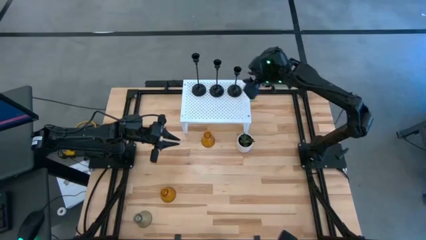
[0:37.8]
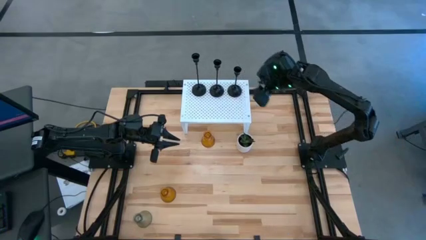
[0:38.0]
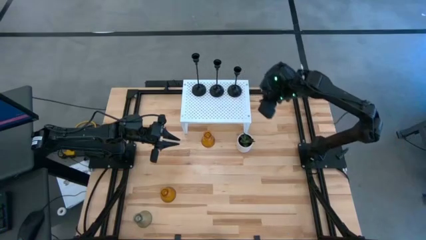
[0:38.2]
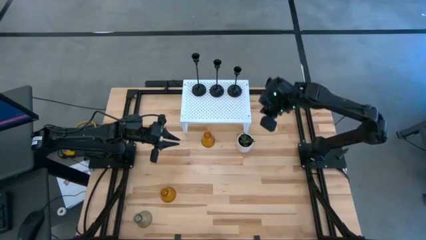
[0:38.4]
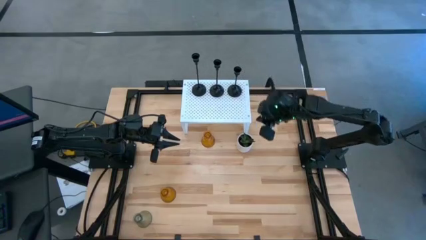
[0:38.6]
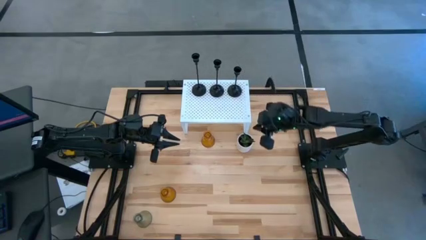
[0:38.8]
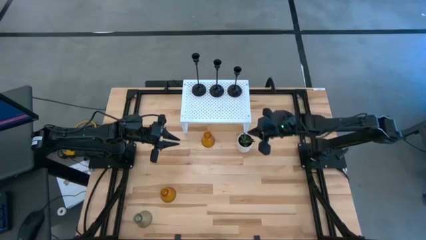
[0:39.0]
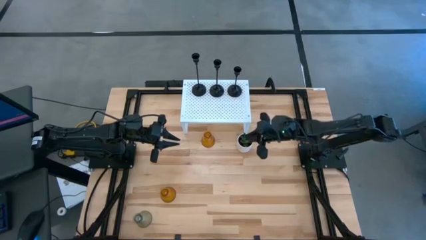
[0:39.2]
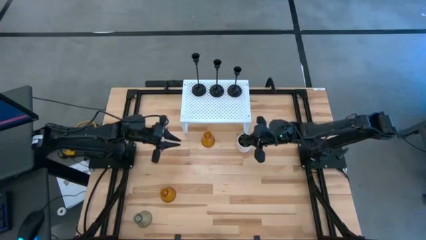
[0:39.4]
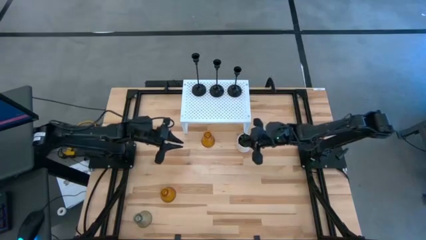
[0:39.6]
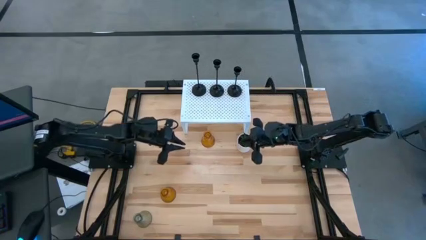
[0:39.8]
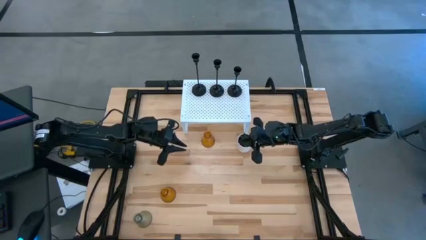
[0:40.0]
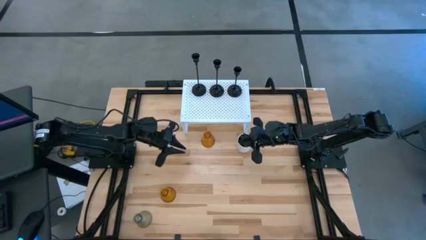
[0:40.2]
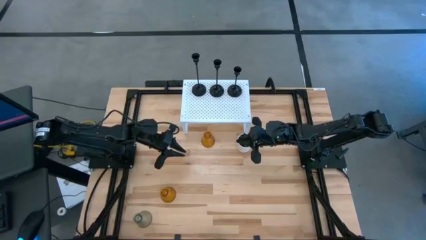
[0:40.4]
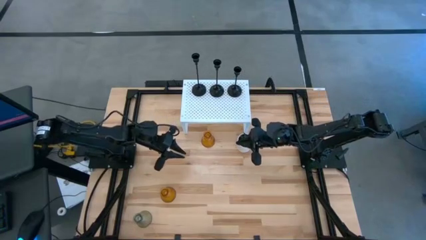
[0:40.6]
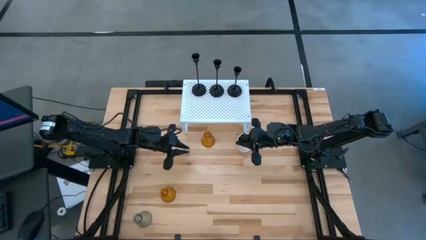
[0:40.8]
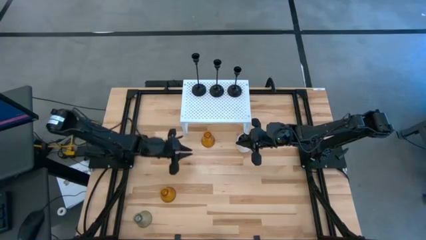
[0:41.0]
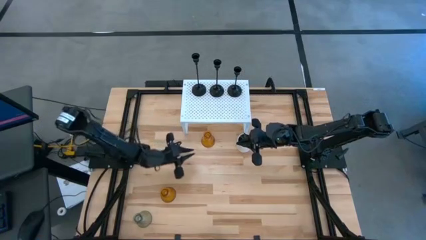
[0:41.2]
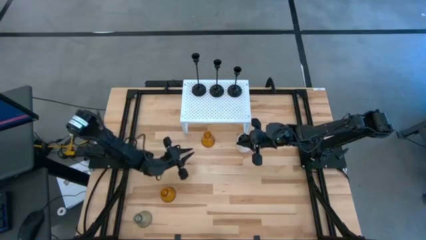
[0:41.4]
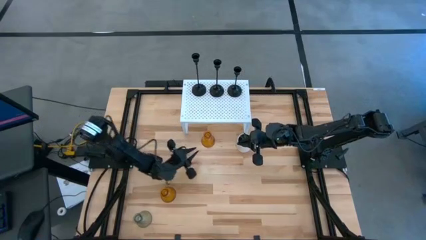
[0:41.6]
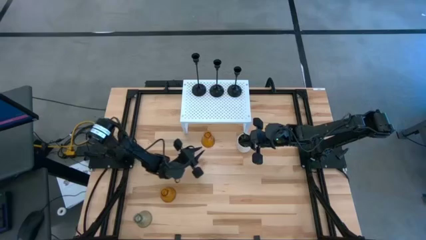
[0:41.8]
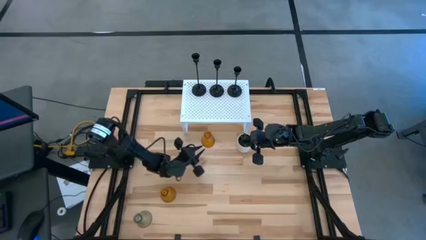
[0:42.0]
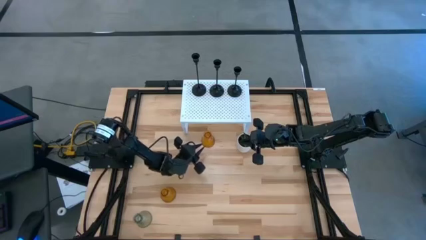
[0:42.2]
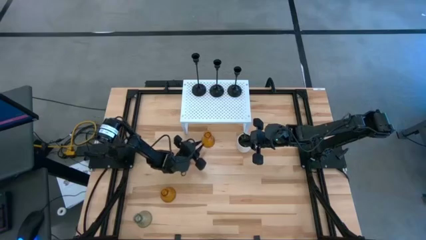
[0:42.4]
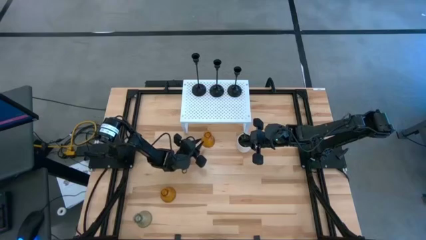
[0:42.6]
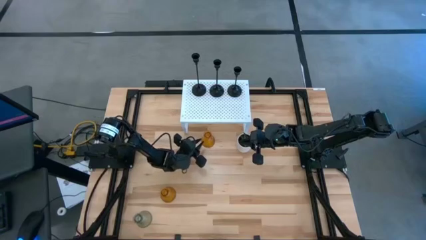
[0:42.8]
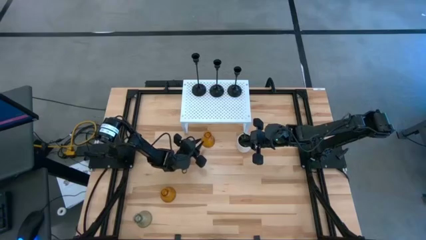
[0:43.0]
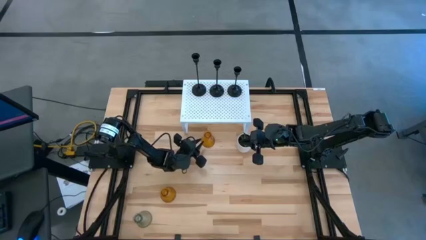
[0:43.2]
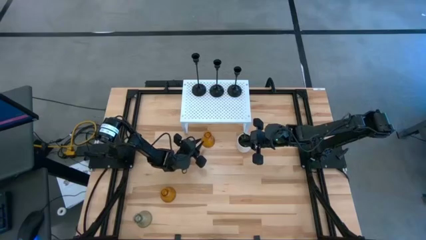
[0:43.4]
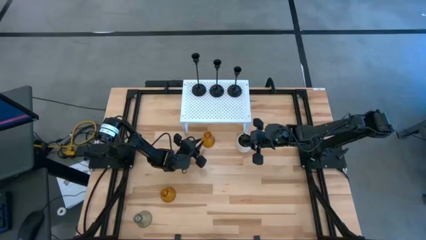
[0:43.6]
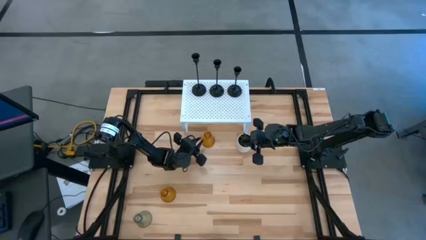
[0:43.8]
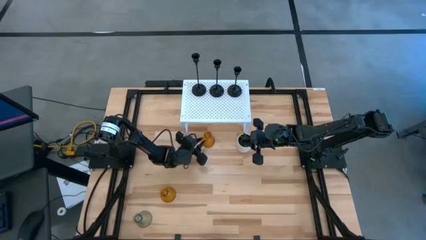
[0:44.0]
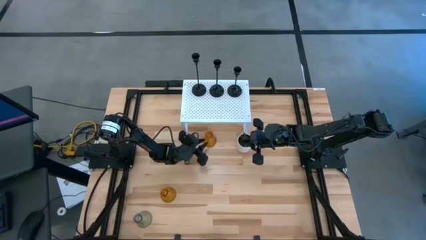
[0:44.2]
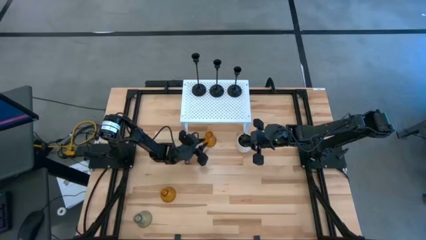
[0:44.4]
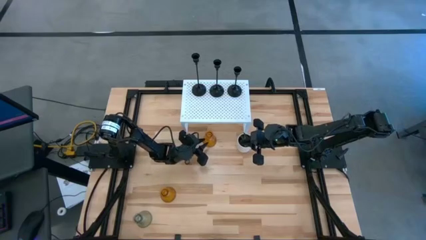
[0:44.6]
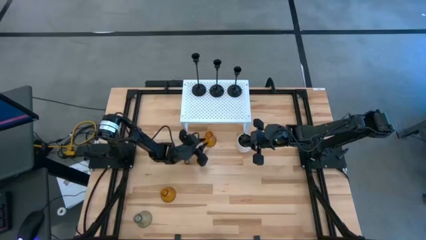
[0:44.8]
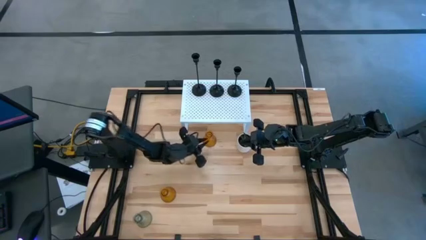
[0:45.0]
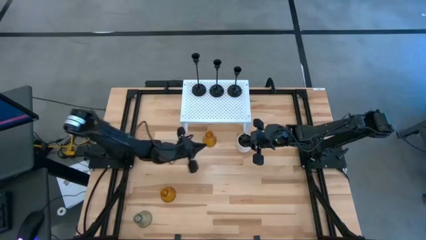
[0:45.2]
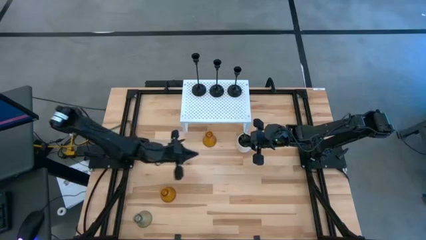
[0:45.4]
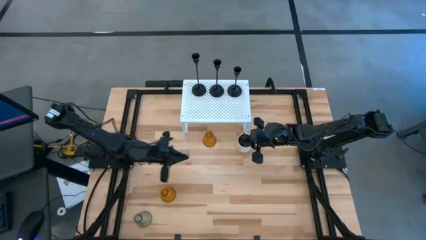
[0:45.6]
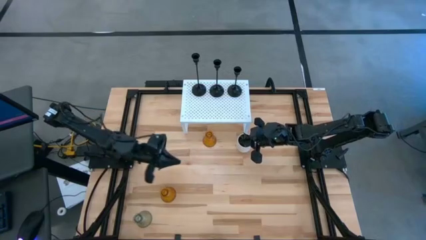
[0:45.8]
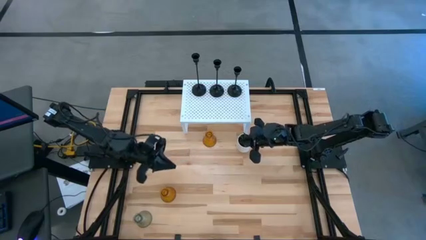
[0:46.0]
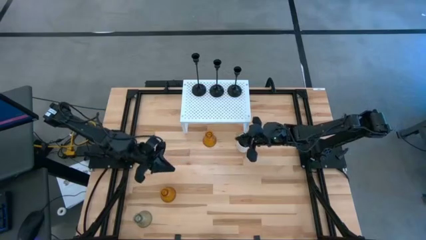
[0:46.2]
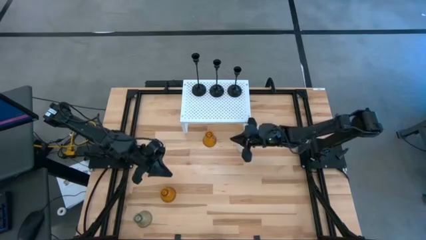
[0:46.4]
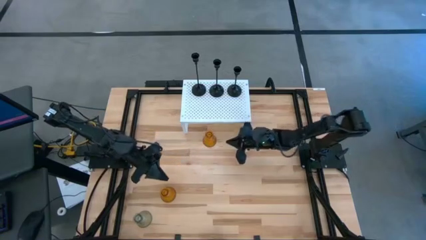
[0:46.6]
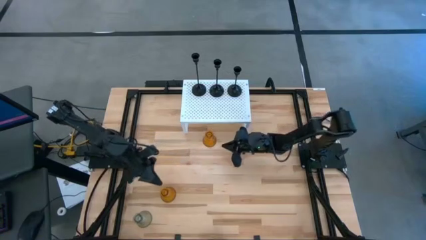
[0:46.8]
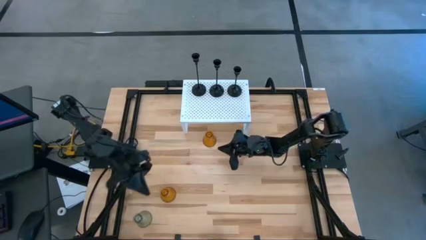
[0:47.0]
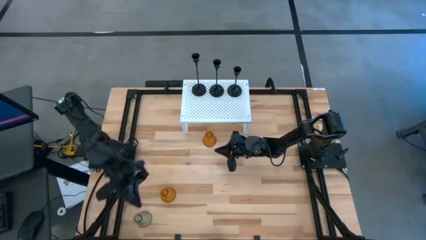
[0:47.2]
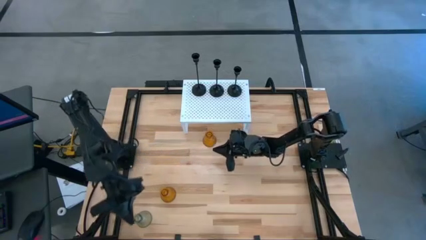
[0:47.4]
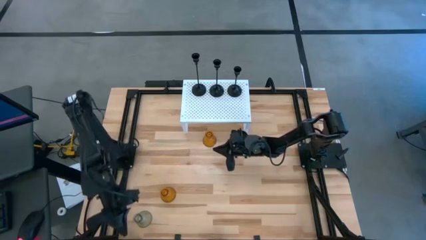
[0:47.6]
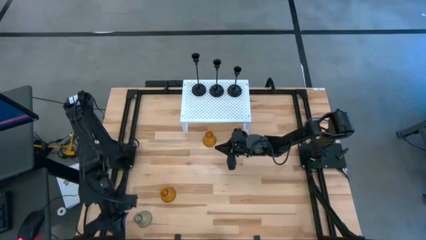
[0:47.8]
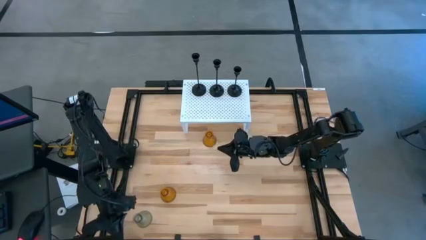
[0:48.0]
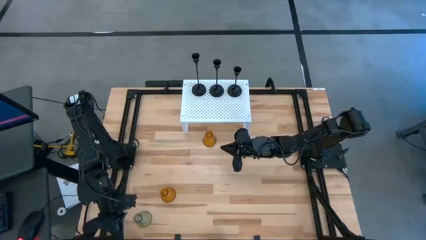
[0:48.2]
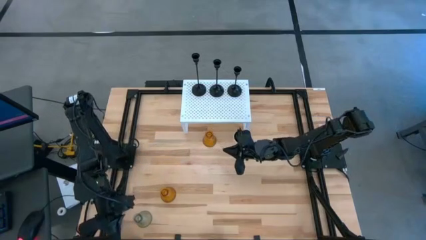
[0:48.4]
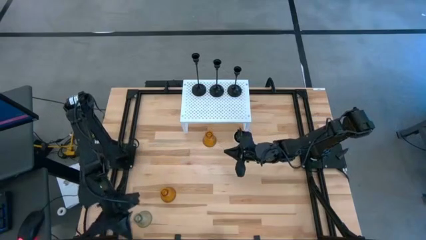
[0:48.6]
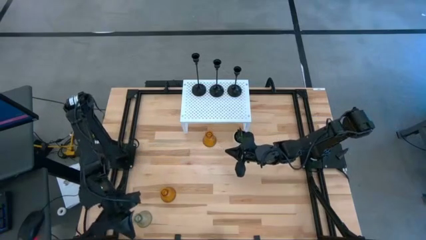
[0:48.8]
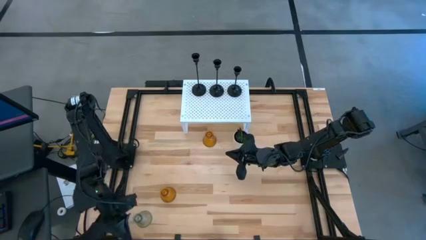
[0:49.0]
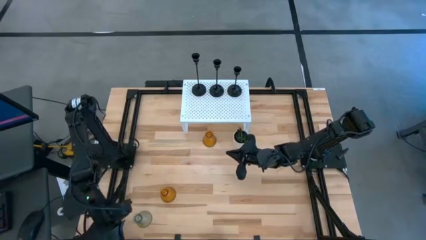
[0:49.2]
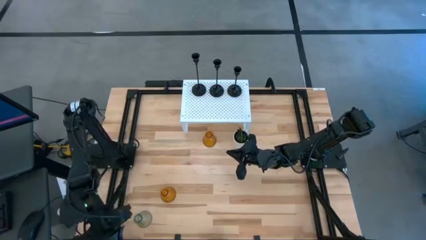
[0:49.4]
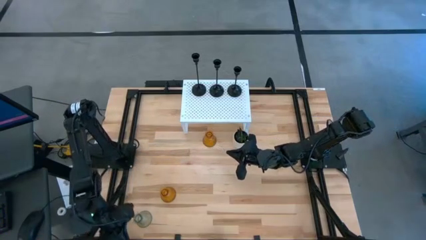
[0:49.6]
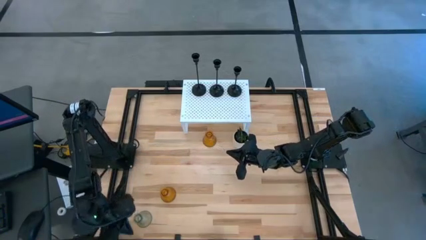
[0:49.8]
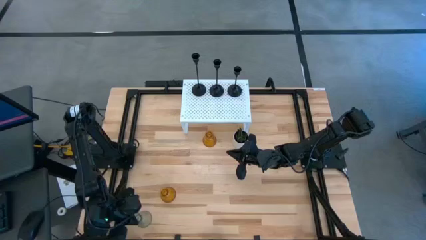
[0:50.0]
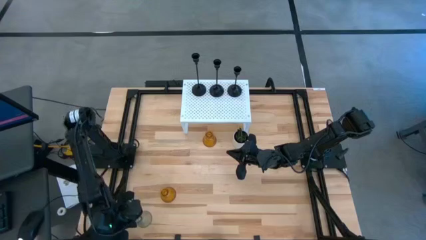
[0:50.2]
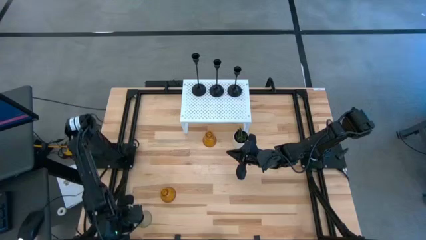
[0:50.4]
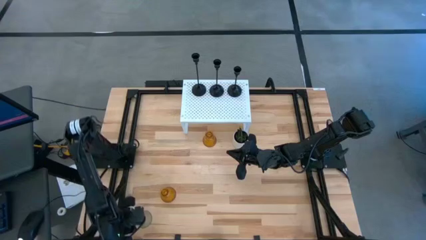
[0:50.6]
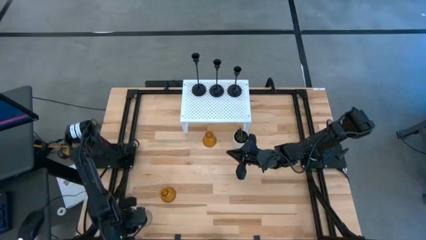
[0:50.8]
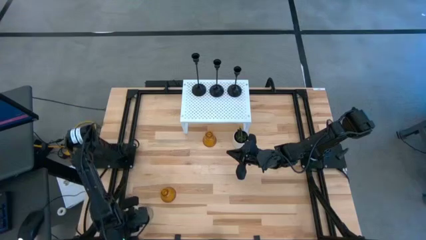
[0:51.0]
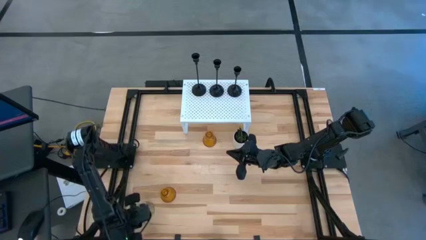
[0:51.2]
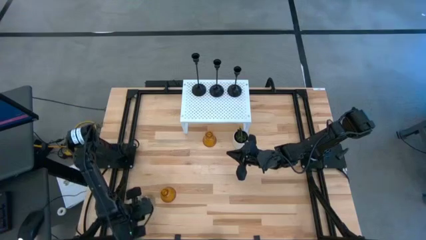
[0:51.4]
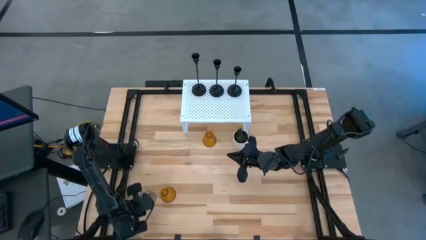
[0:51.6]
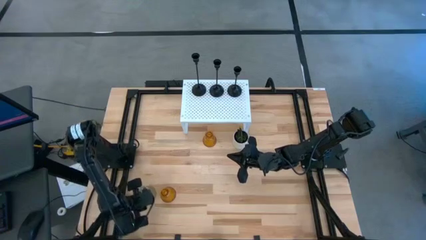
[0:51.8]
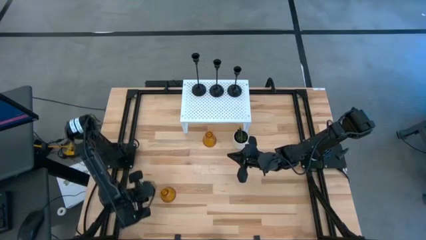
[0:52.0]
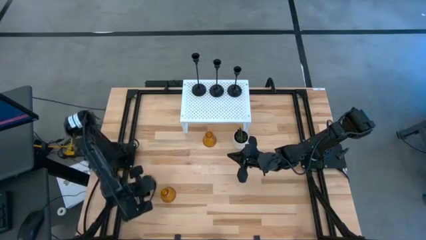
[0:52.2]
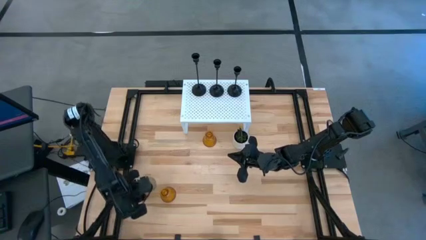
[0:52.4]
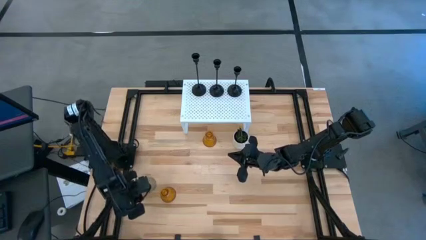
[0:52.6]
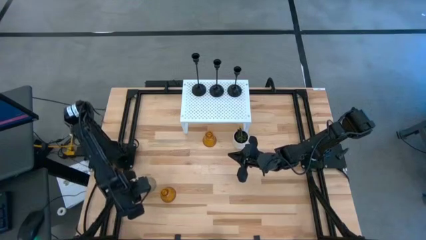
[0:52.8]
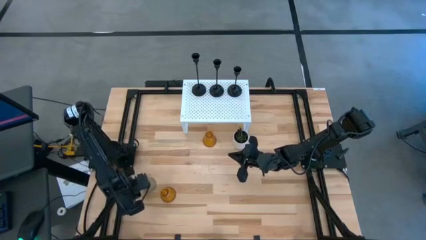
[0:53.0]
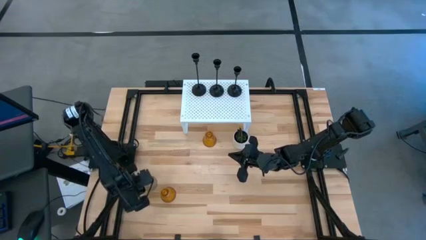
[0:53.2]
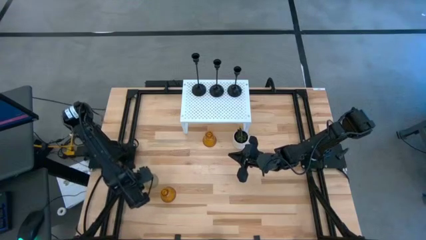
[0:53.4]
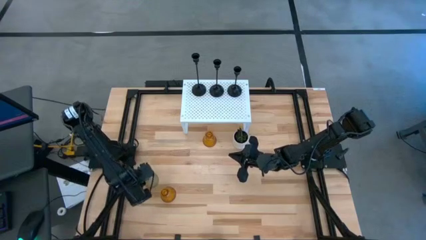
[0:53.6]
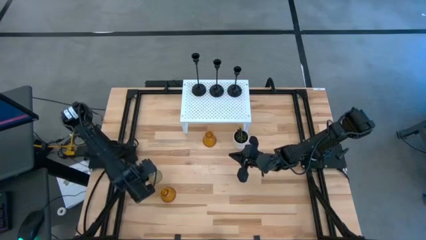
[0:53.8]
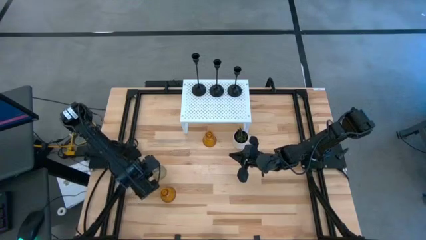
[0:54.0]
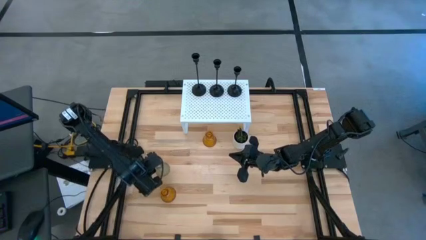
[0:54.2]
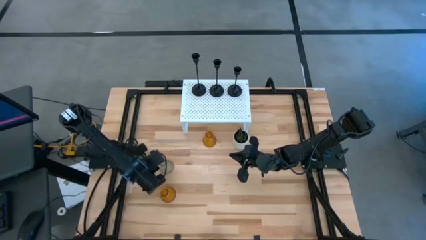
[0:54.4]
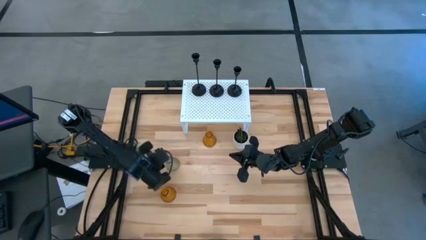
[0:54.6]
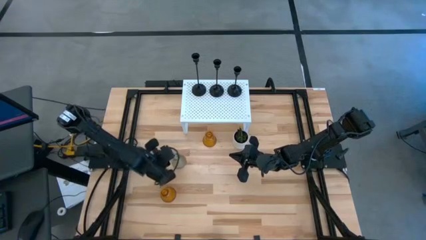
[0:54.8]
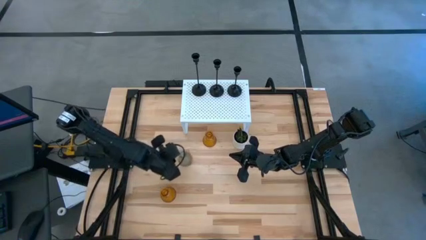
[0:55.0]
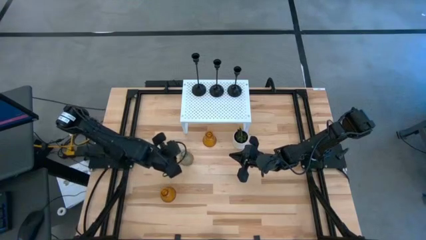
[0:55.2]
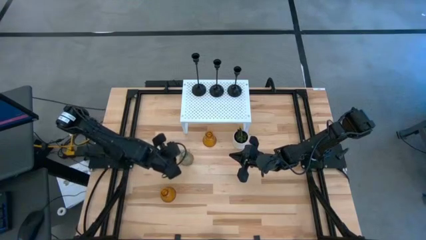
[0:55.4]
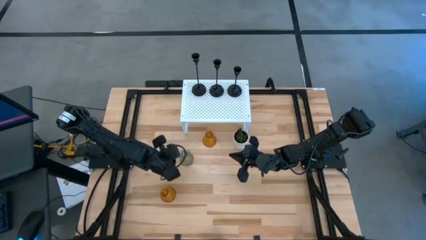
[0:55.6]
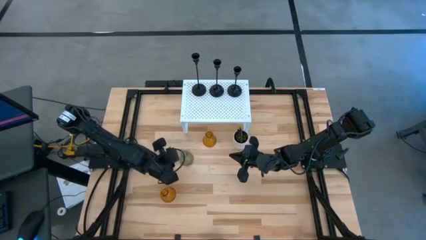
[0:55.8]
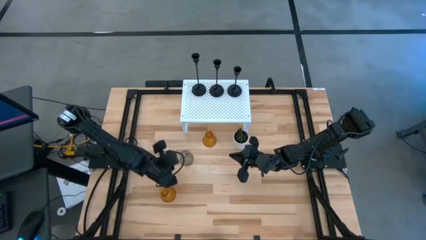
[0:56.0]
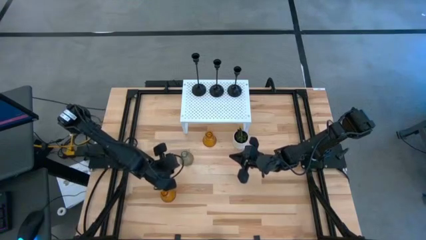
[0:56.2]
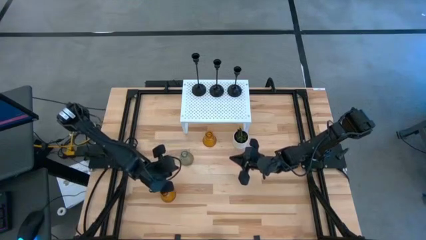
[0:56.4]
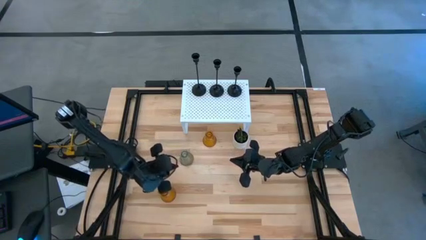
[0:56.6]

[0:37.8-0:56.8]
Task: Pick & Place candle stick holders
Put the transparent glass candle holder on the shelf
